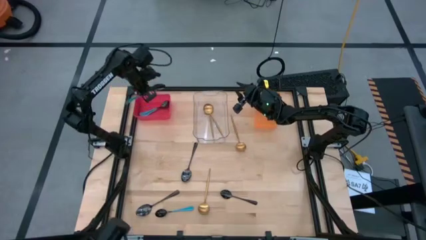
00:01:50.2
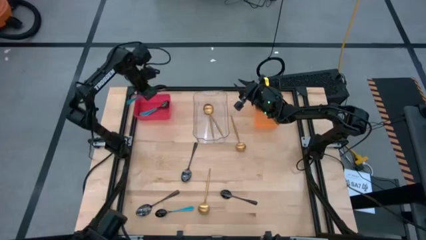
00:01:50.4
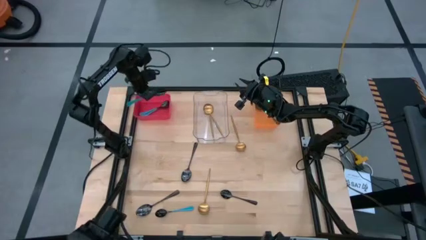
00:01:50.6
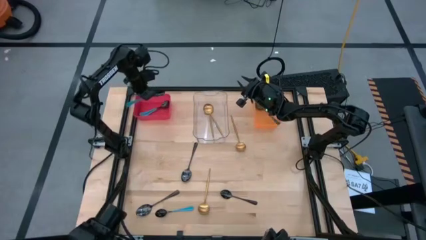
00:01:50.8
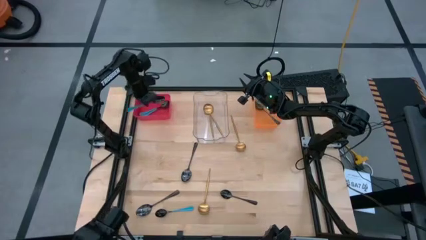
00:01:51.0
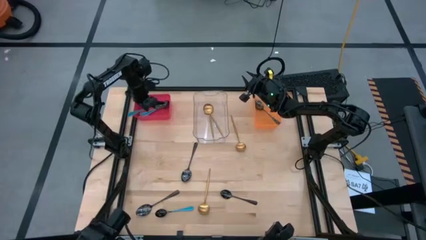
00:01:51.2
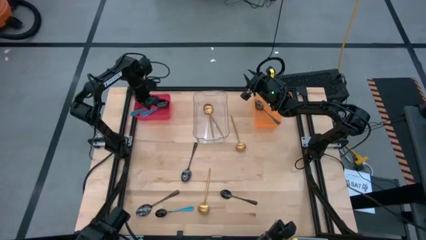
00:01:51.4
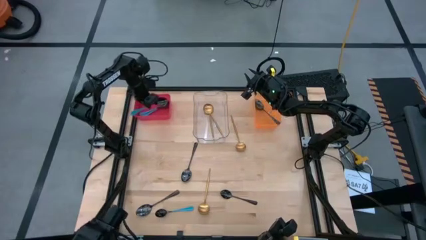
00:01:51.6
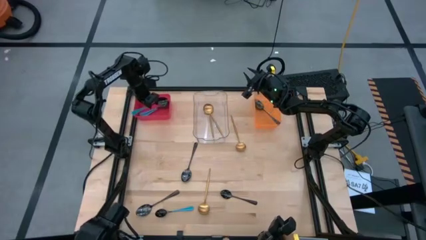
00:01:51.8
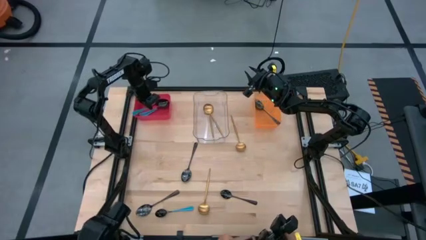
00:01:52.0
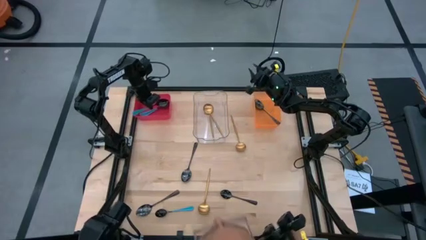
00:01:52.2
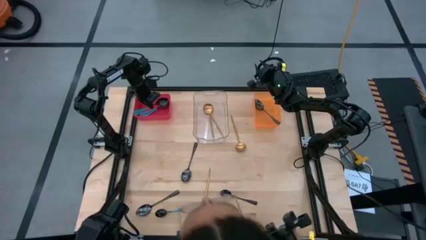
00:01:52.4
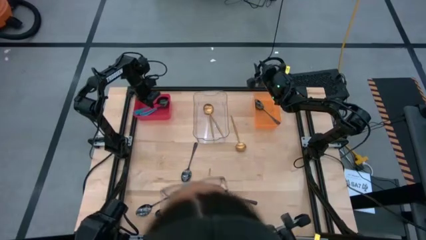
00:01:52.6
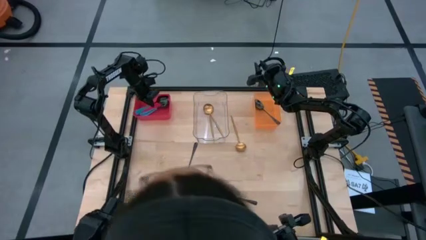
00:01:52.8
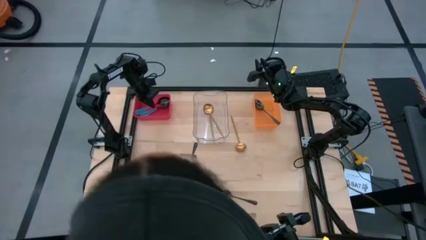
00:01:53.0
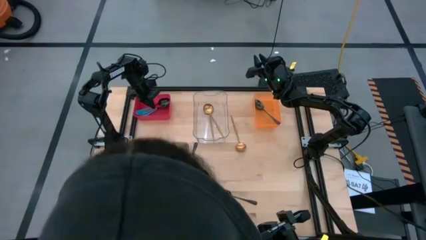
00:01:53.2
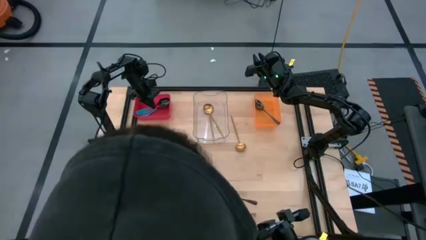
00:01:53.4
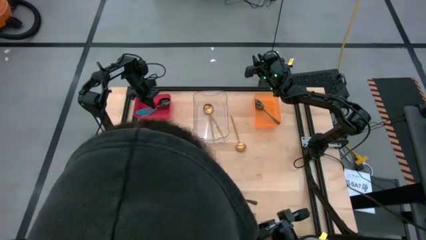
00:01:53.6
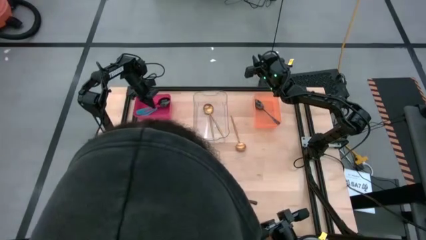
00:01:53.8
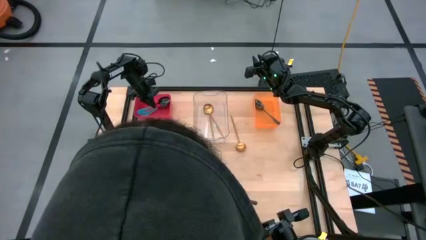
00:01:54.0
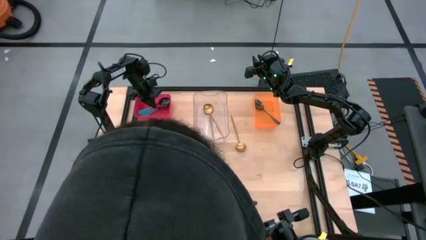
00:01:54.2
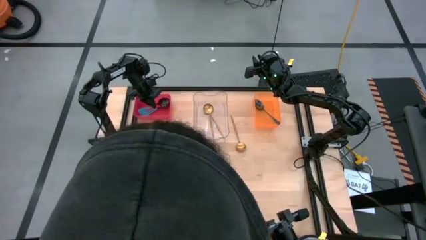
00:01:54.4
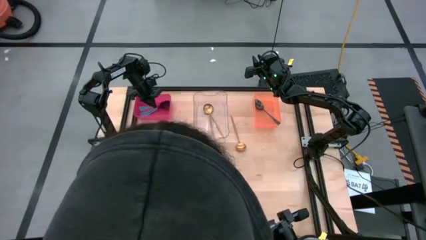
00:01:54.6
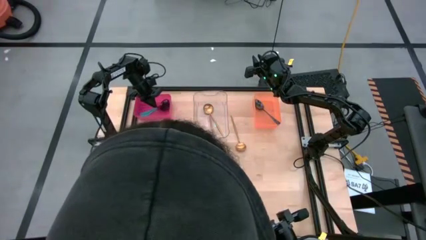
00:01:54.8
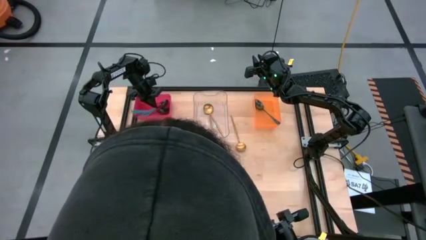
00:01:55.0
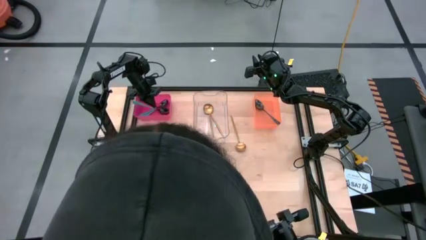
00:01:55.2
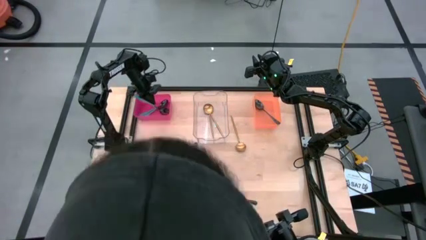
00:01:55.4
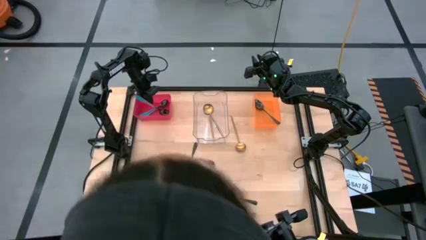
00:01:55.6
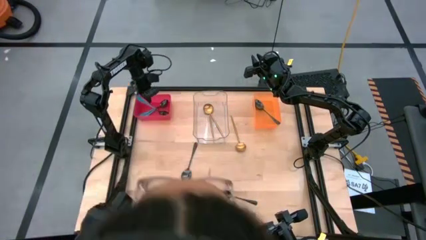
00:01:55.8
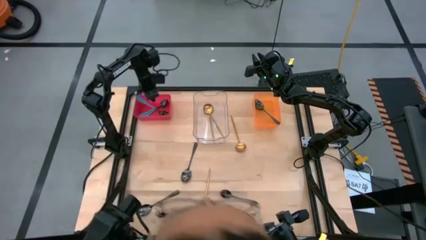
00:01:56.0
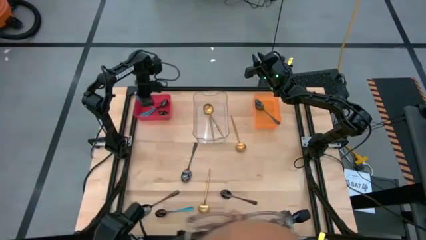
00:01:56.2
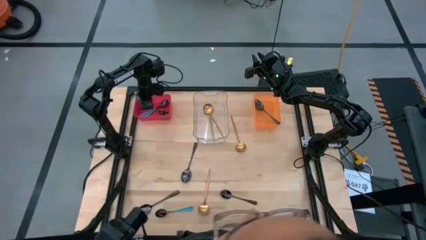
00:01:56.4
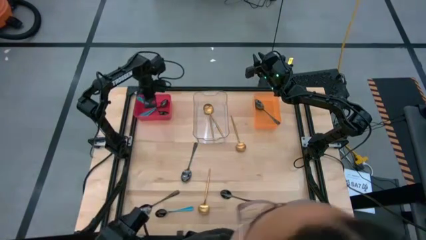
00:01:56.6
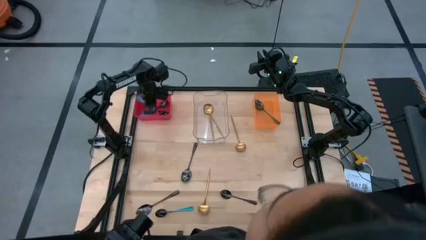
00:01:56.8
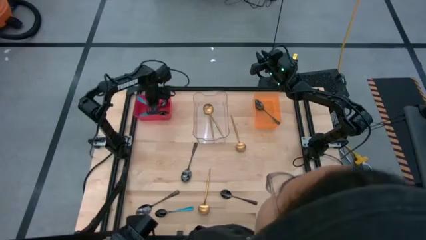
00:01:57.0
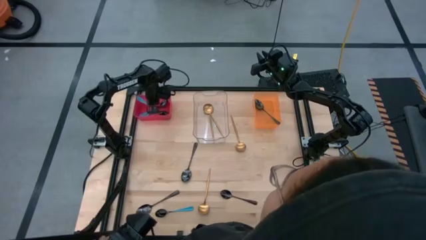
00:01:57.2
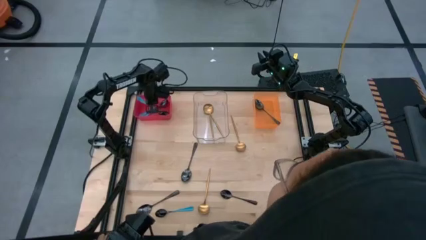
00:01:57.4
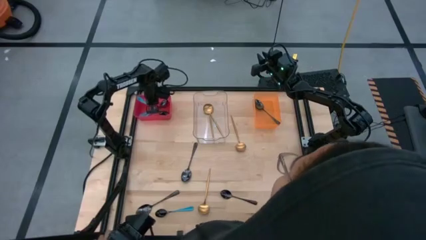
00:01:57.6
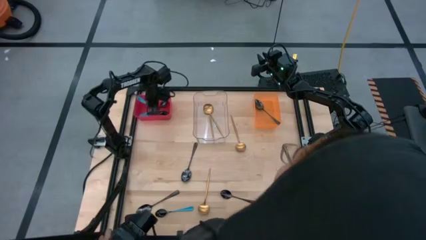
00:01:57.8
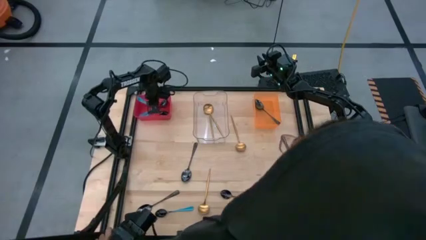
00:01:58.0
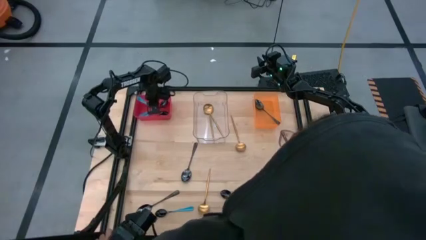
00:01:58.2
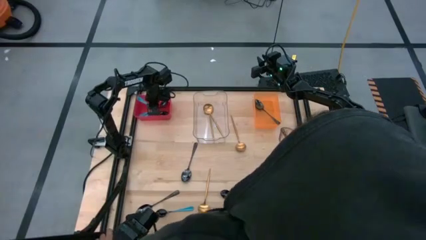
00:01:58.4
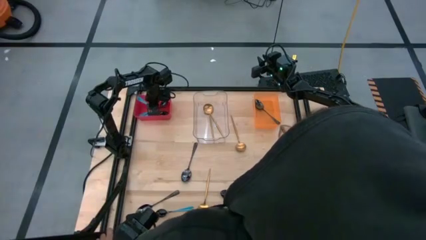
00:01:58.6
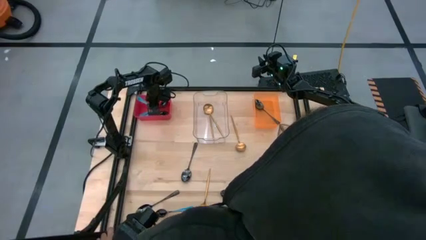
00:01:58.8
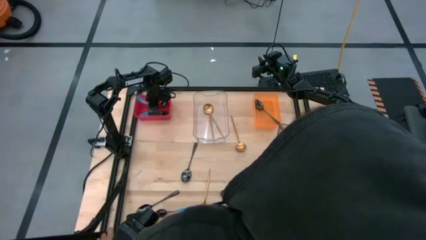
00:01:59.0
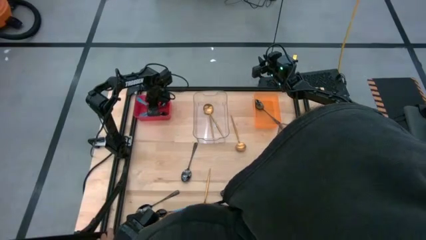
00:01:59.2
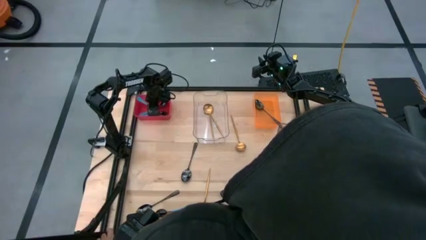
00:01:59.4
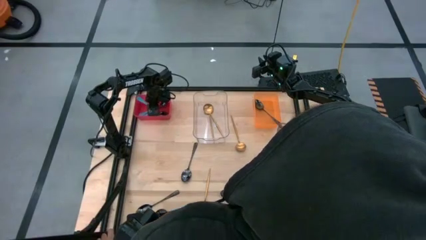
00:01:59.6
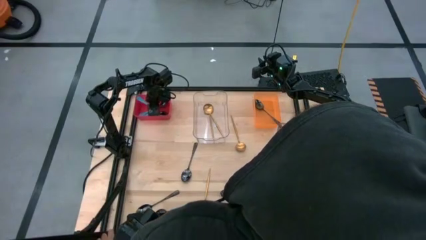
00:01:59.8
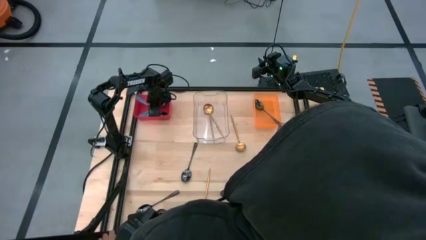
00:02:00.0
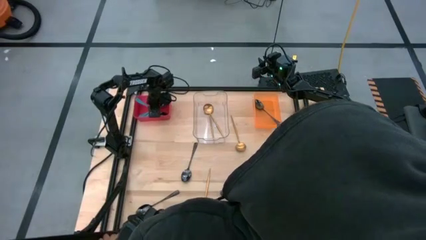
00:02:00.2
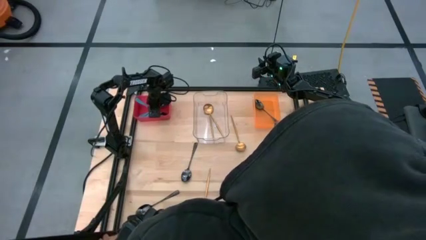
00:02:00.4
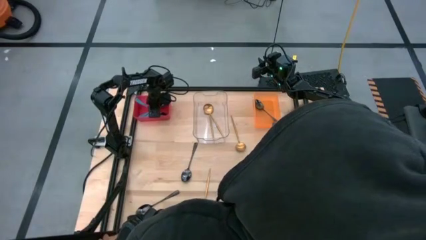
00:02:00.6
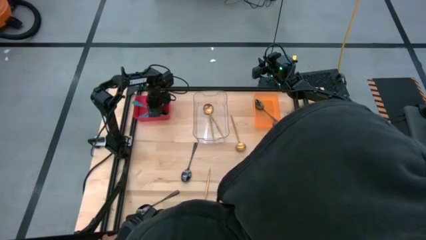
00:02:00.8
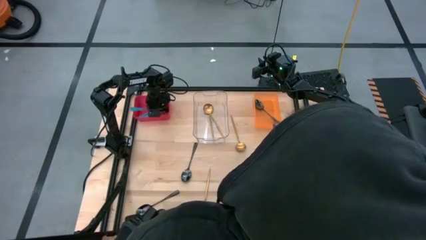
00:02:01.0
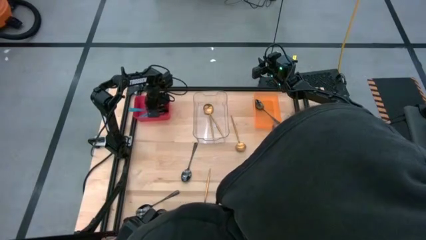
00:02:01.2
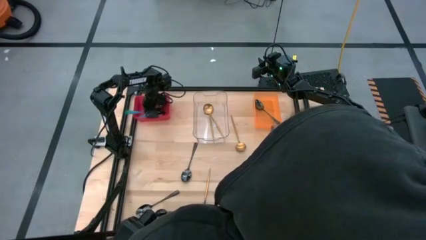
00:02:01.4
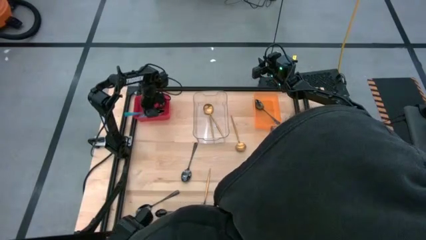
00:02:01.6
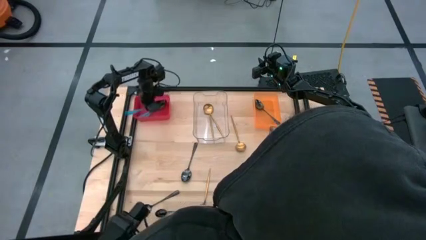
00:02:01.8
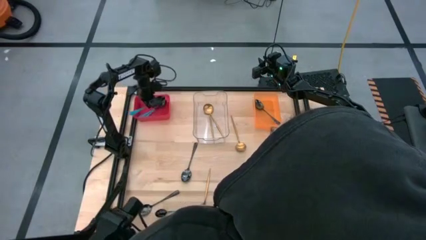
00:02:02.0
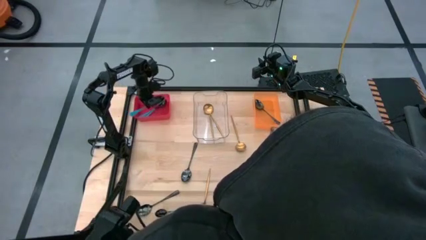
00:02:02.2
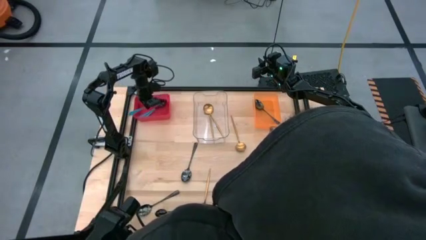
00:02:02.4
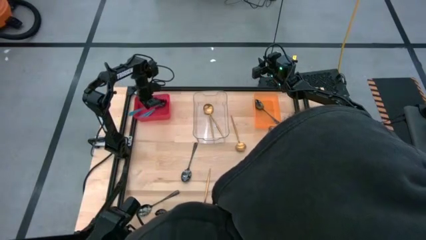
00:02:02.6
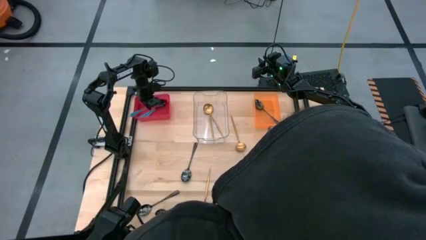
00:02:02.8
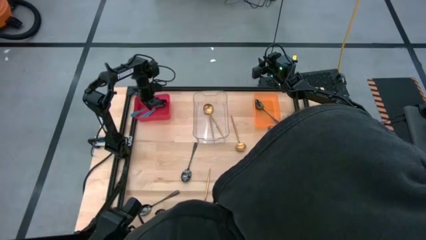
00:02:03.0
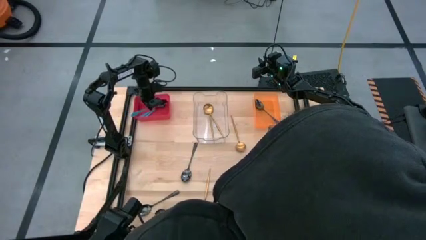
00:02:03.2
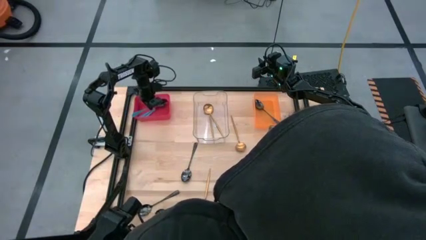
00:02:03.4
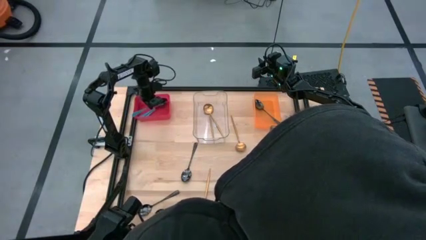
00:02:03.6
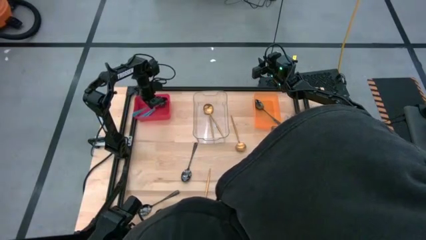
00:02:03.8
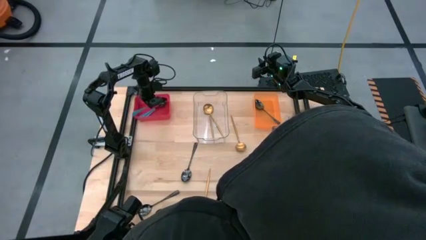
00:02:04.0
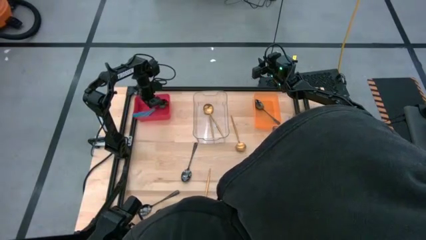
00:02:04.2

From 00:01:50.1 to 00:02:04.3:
Task: Sort silverware by color (type)
Put the blue spoon into the red bin
